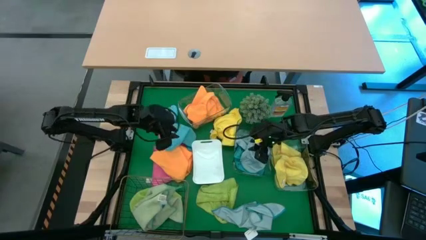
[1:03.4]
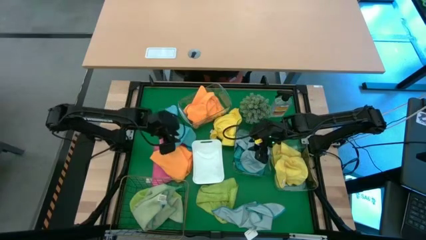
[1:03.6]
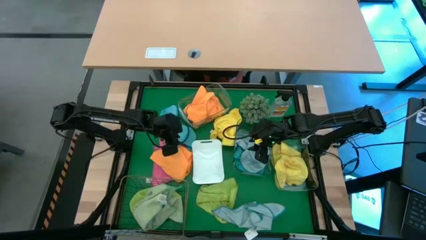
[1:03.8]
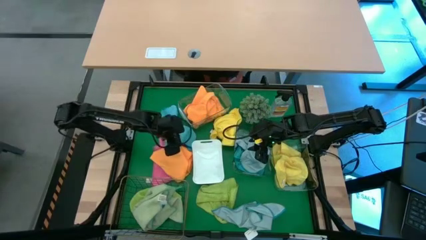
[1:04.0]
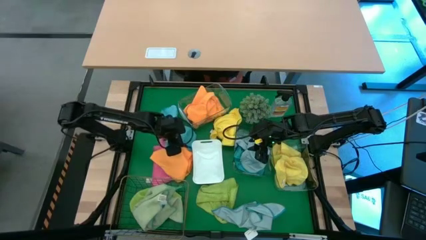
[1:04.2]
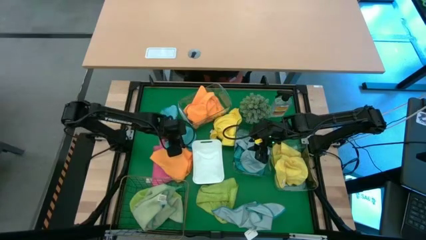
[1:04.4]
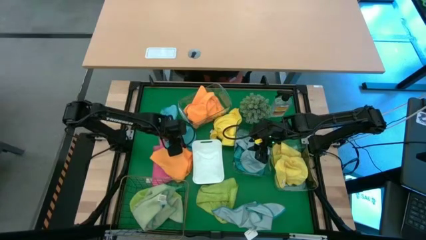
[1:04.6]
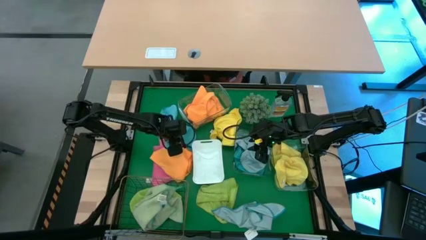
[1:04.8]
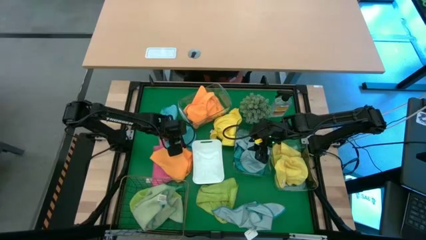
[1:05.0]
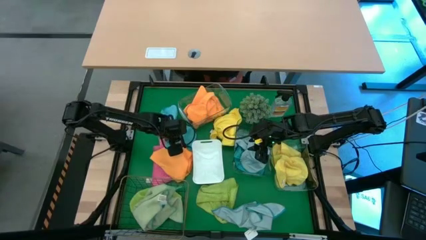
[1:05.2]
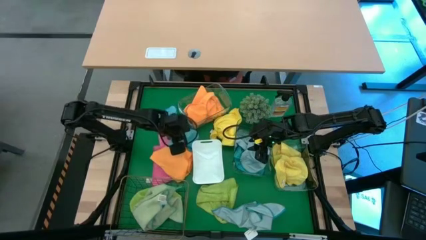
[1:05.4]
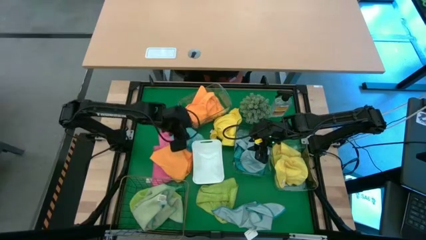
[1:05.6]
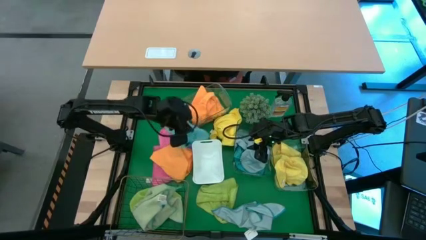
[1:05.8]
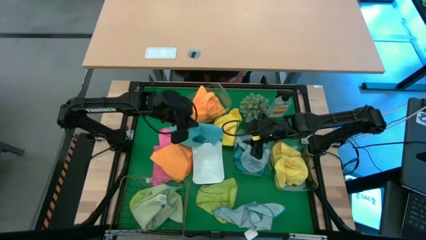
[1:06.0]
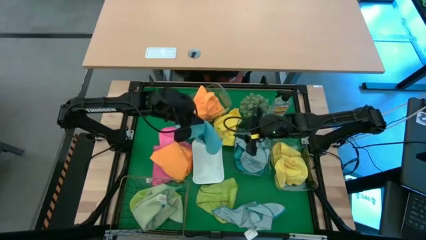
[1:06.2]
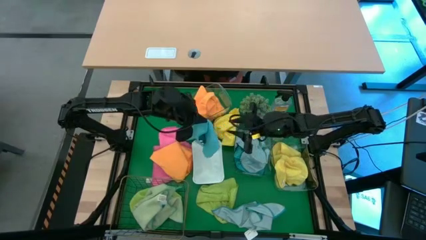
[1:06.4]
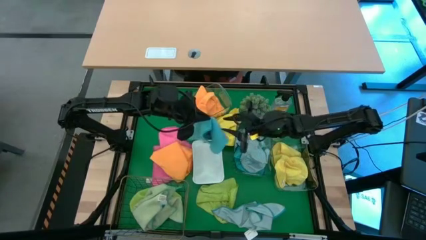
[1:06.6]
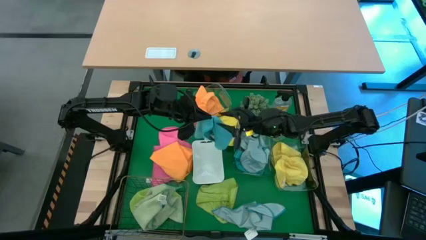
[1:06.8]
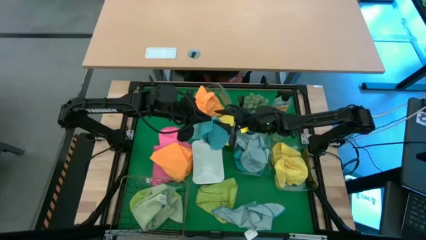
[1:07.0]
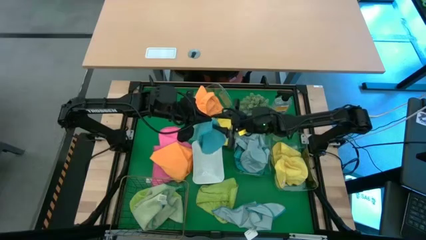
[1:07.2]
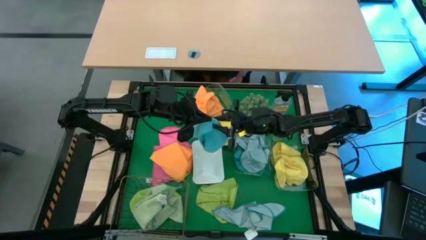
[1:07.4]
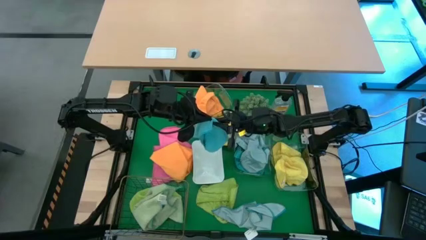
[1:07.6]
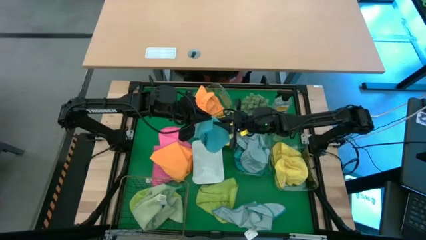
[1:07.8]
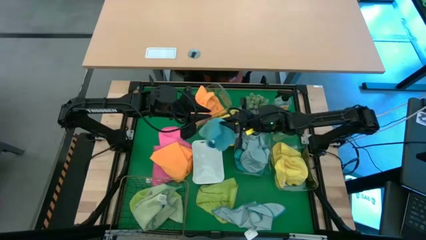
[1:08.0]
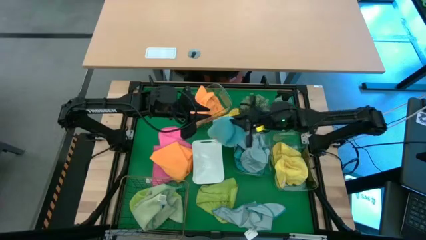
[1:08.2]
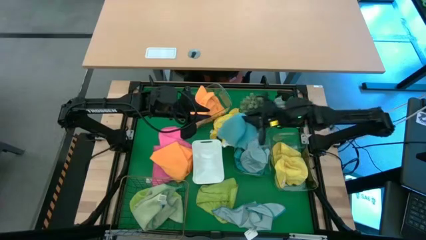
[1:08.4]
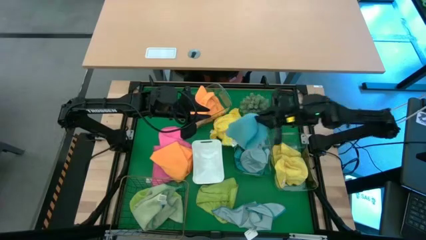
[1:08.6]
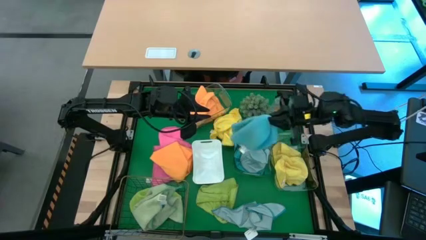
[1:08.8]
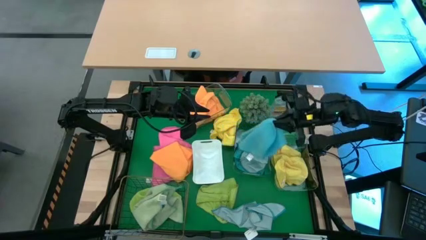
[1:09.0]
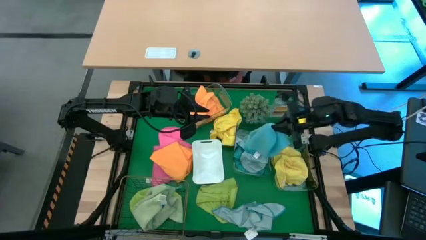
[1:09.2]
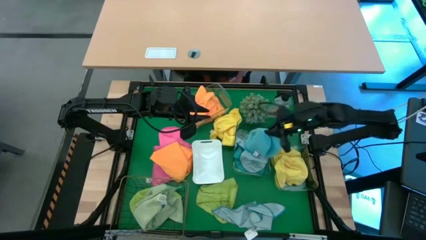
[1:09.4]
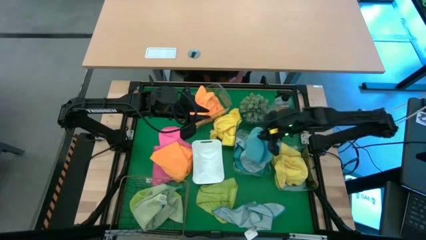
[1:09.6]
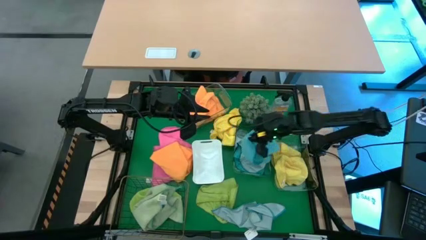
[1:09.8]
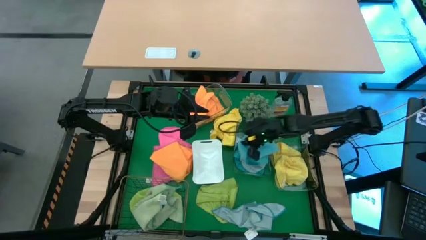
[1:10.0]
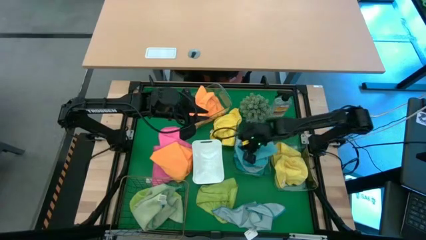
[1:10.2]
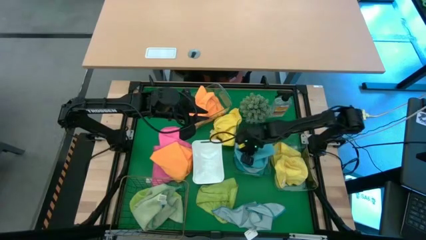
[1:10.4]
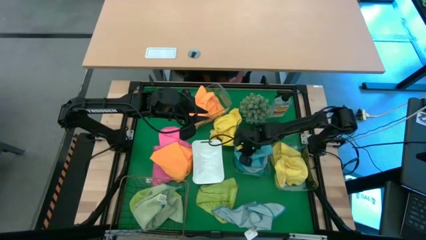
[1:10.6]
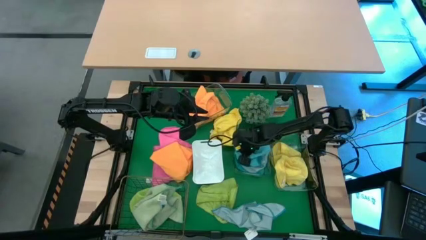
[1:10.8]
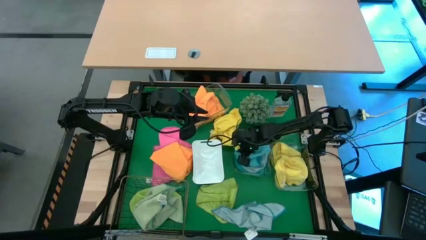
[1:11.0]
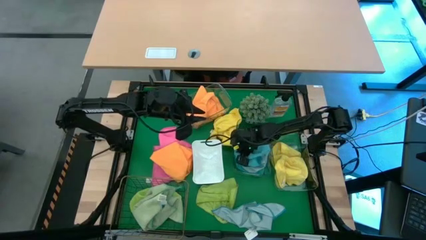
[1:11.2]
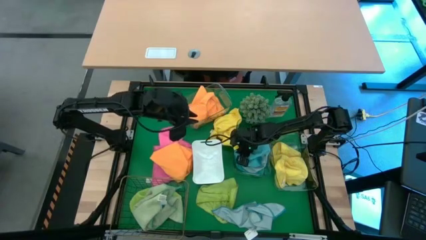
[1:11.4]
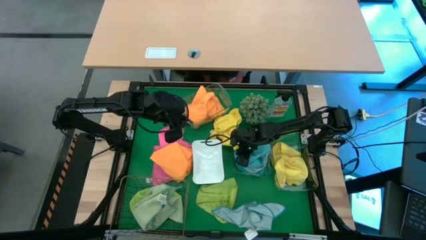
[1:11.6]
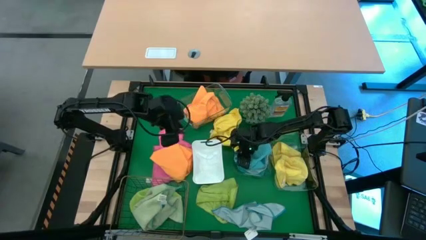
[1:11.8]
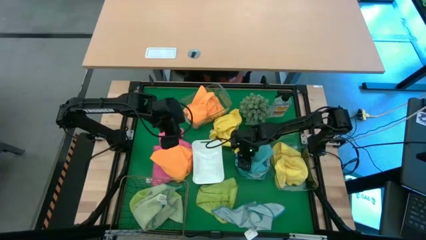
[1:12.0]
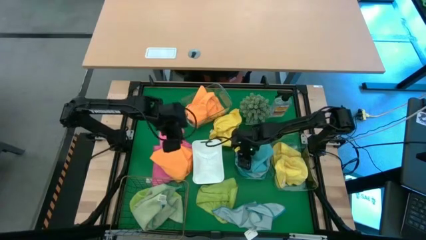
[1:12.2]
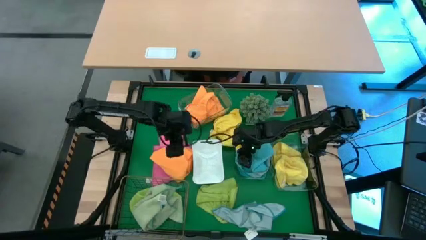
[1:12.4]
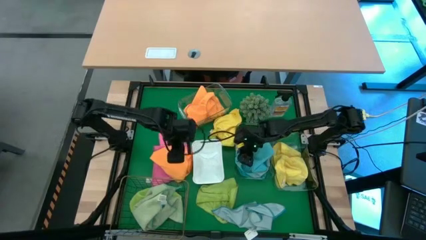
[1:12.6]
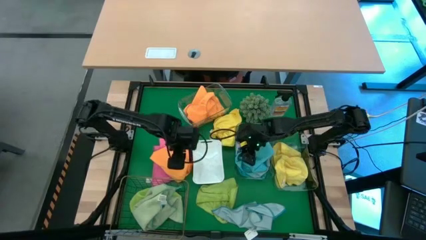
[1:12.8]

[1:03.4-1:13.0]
Task: Sort microfiber towel by color & place in baskets
Put the blue microfiber towel into the middle transparent bin

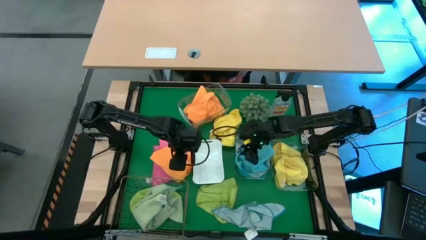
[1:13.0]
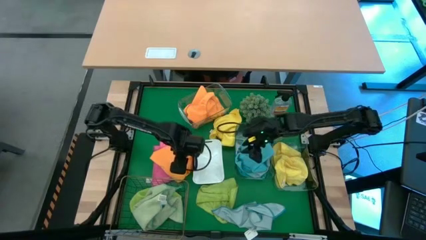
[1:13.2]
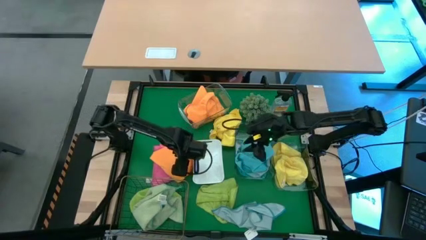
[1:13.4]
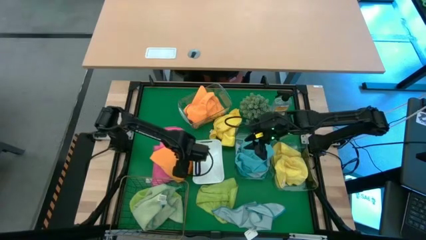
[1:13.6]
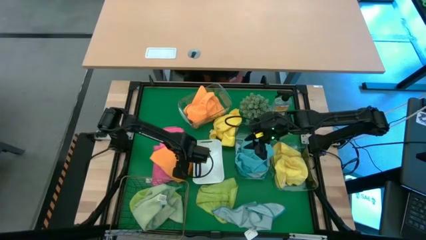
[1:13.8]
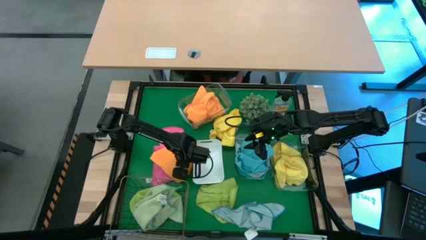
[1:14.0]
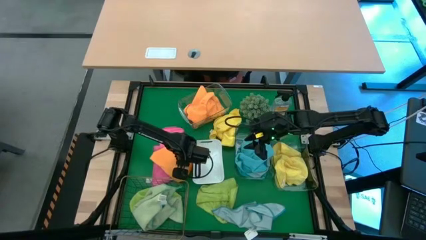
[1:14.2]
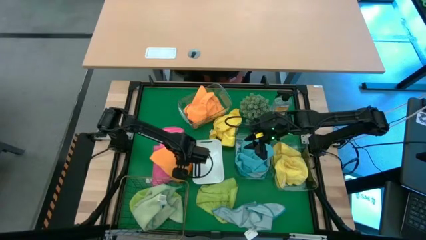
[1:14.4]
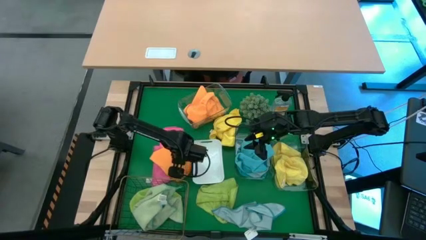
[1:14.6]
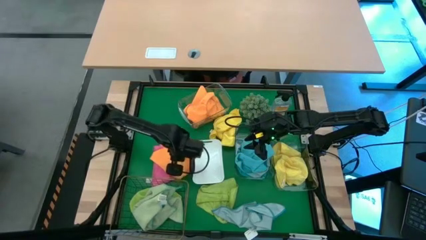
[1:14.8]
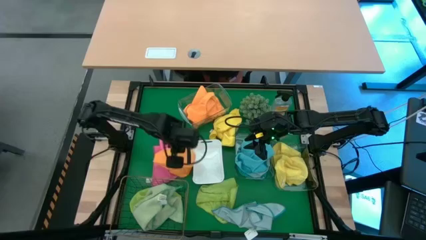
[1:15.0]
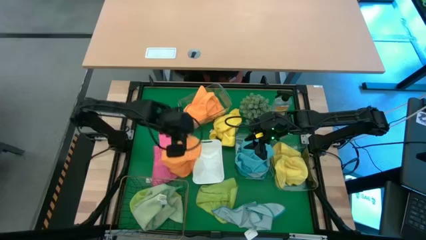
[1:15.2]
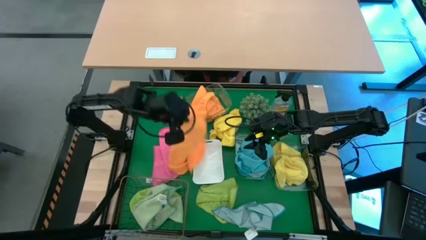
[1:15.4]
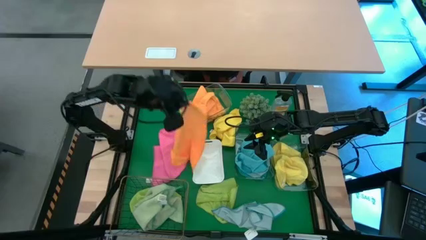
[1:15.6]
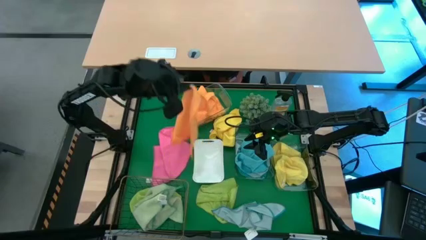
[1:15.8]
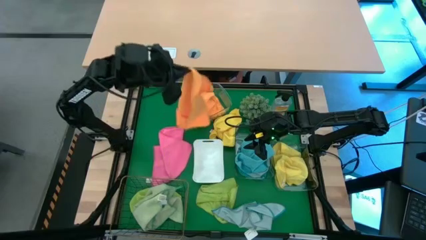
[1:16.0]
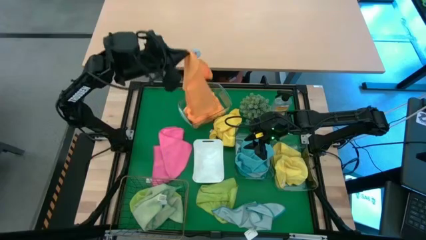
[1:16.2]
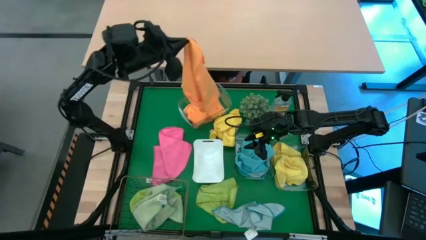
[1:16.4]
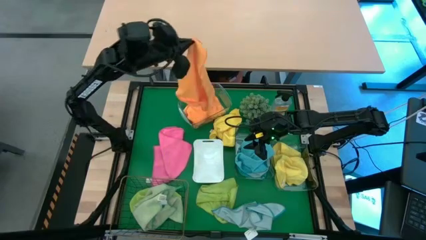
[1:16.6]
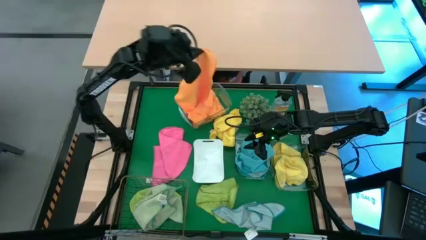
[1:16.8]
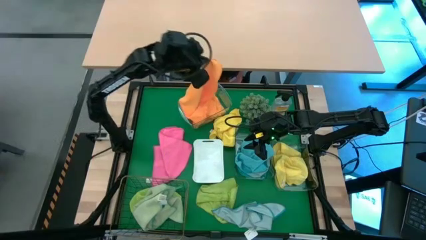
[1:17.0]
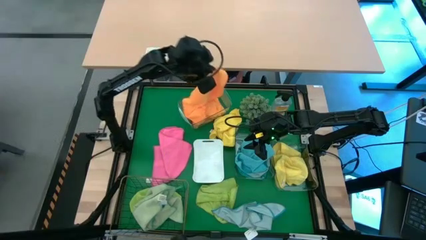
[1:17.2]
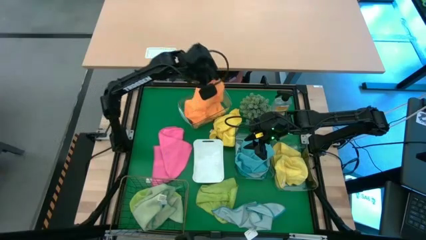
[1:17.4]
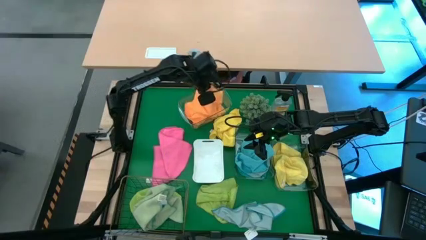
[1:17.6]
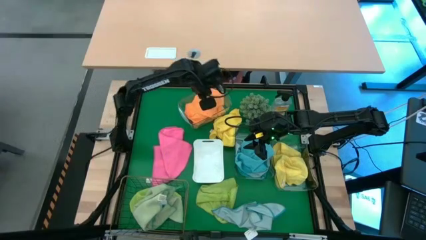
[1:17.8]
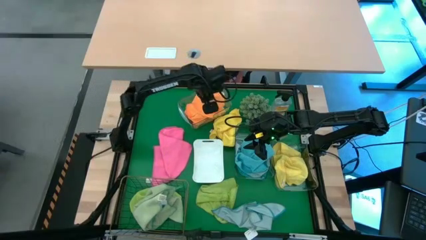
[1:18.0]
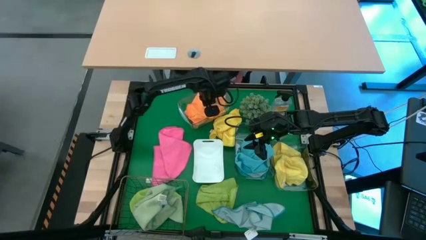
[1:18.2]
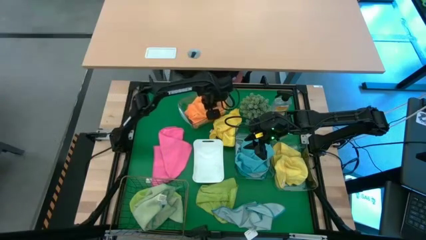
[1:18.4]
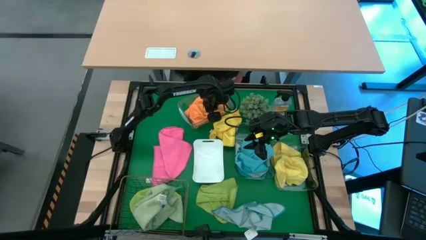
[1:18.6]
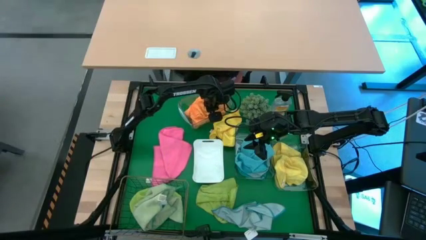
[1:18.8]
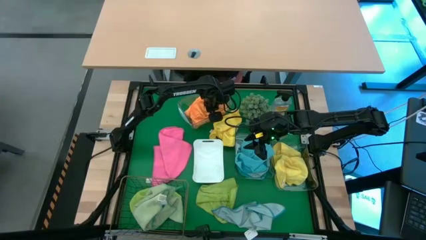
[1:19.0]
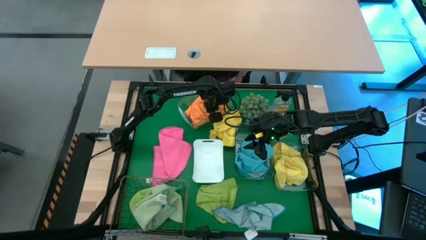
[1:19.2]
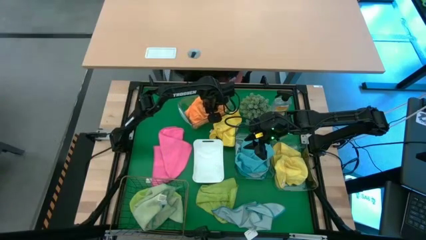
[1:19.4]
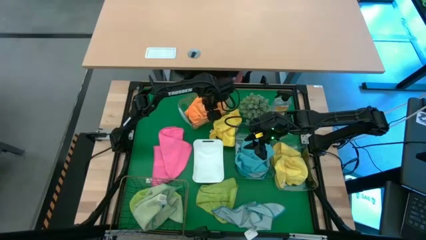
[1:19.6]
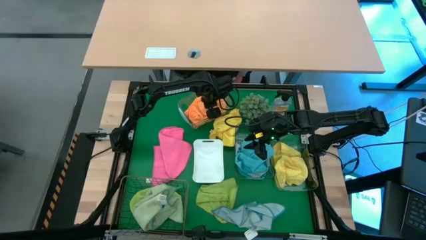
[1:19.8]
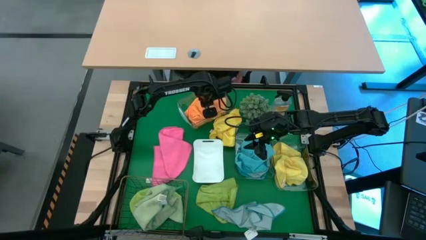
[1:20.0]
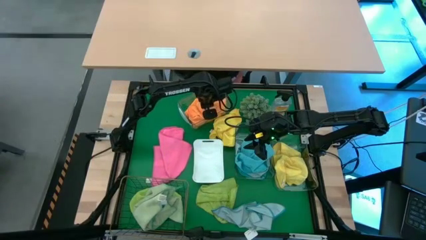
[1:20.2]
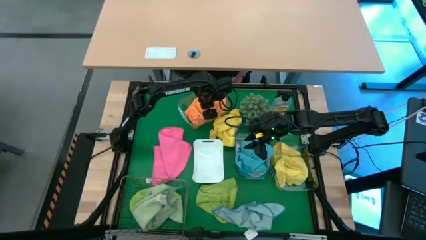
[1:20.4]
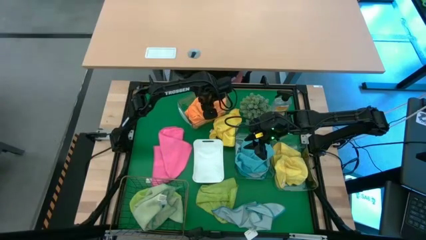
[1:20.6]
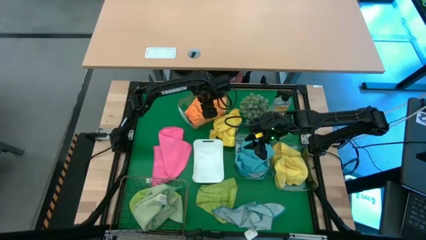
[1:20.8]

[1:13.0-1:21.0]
Put the orange microfiber towel into the top transparent bin
